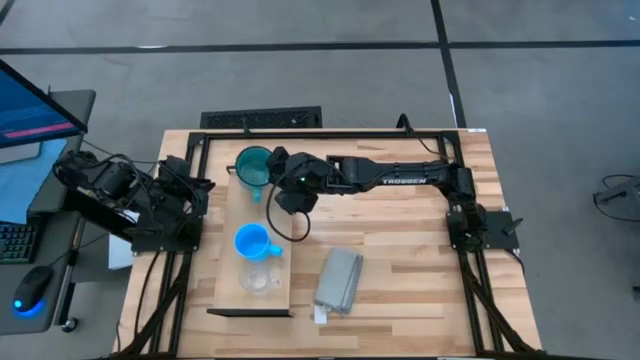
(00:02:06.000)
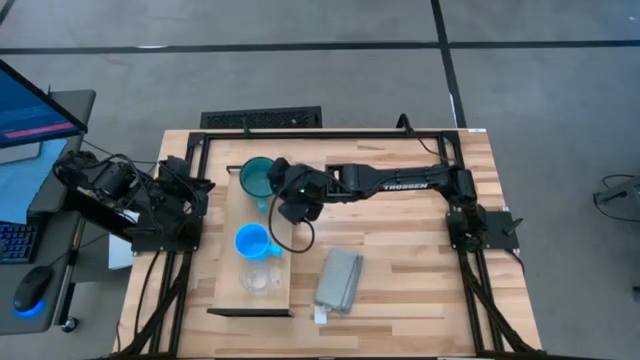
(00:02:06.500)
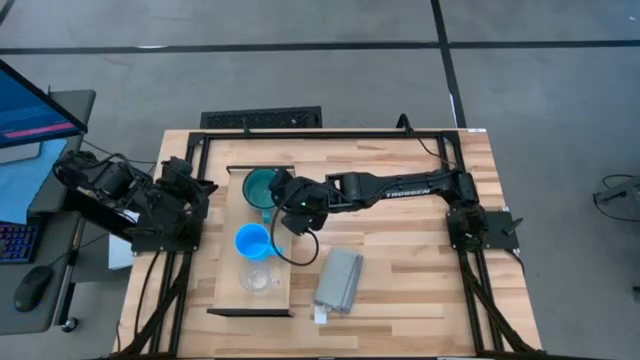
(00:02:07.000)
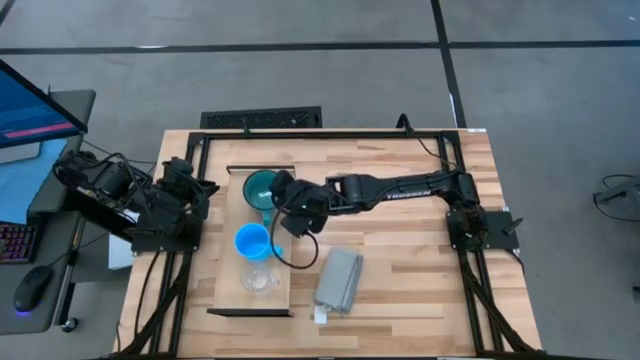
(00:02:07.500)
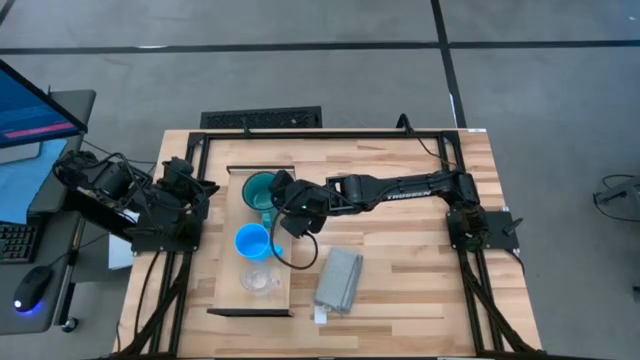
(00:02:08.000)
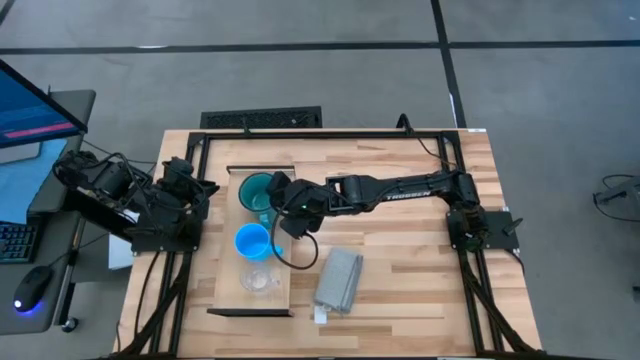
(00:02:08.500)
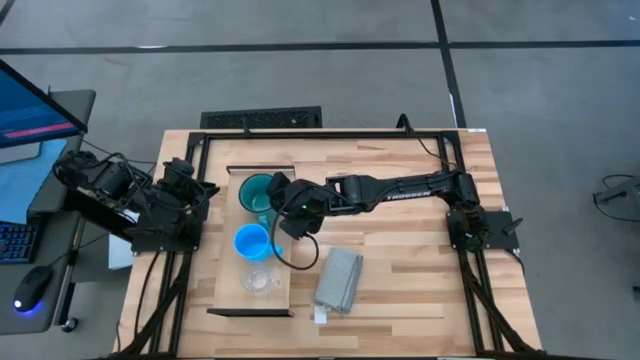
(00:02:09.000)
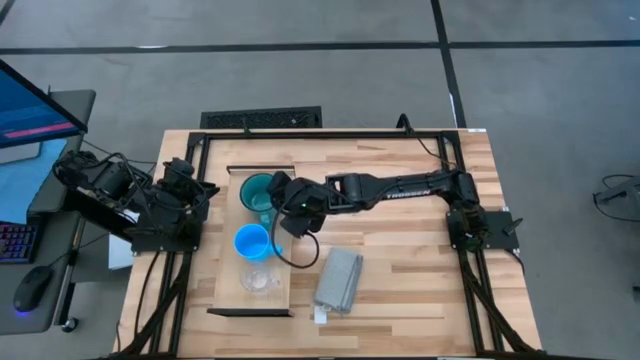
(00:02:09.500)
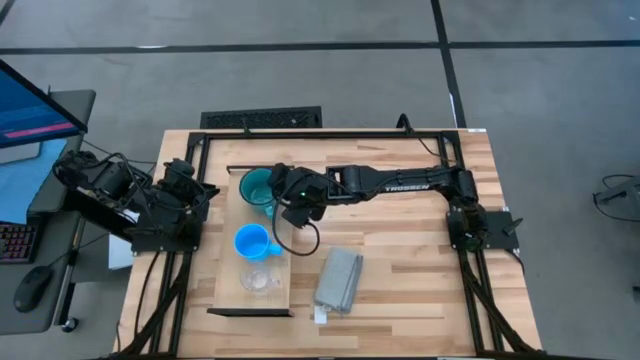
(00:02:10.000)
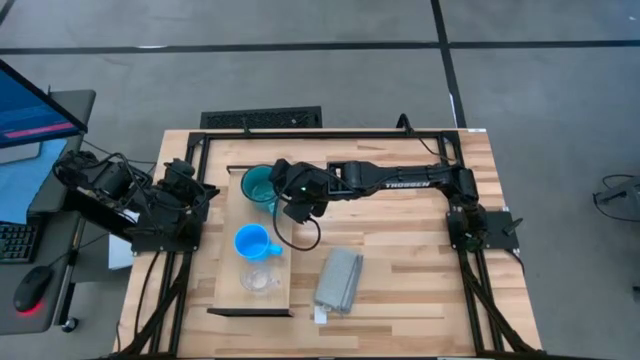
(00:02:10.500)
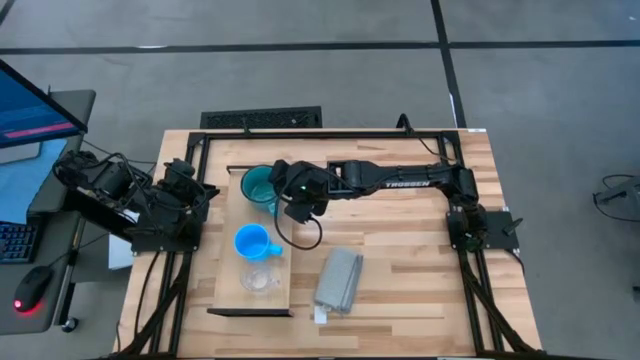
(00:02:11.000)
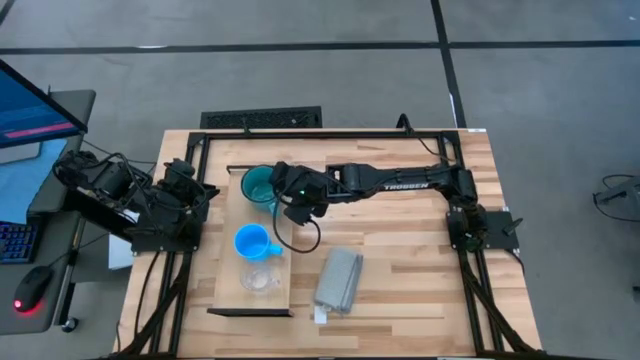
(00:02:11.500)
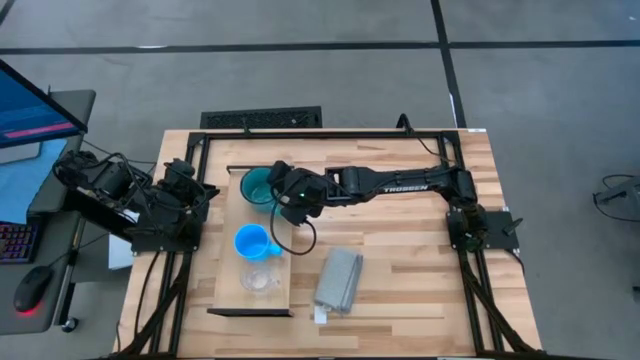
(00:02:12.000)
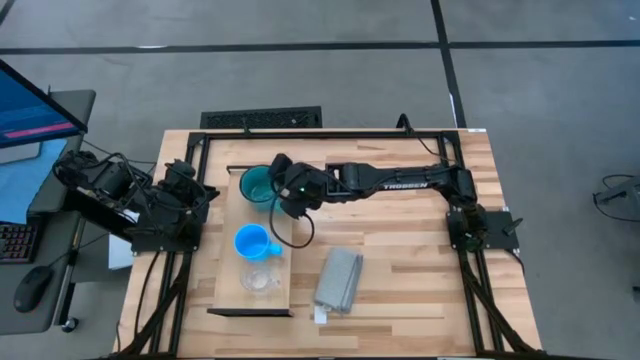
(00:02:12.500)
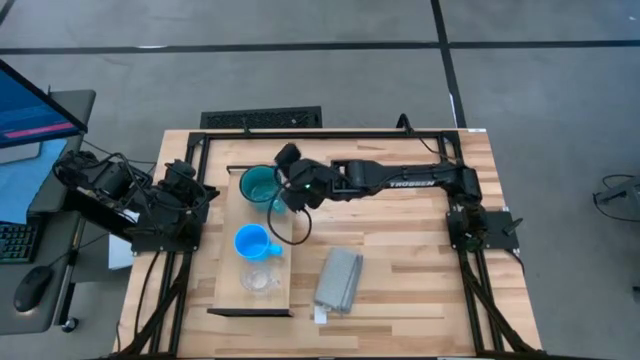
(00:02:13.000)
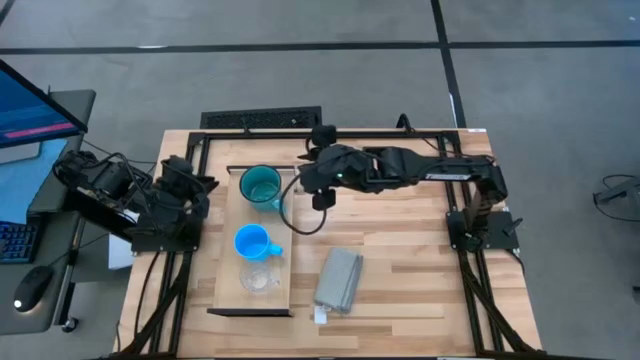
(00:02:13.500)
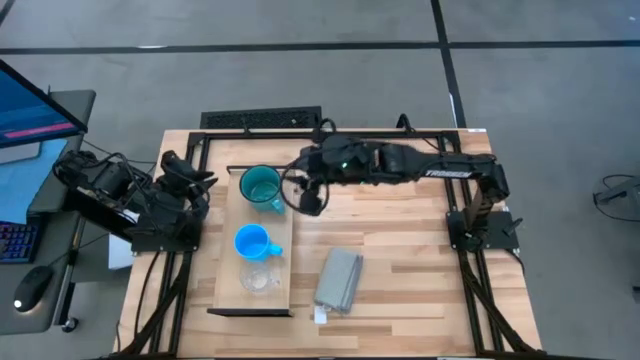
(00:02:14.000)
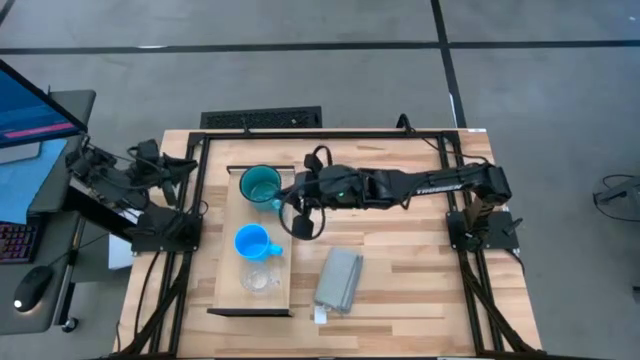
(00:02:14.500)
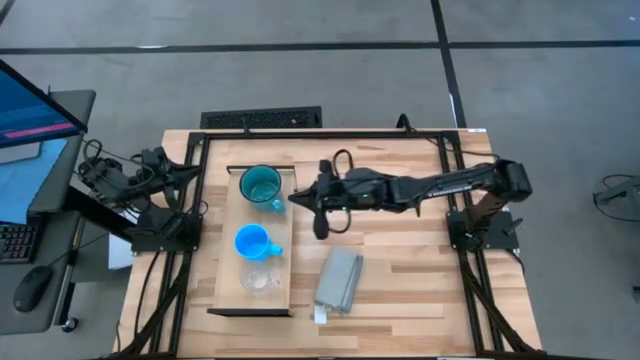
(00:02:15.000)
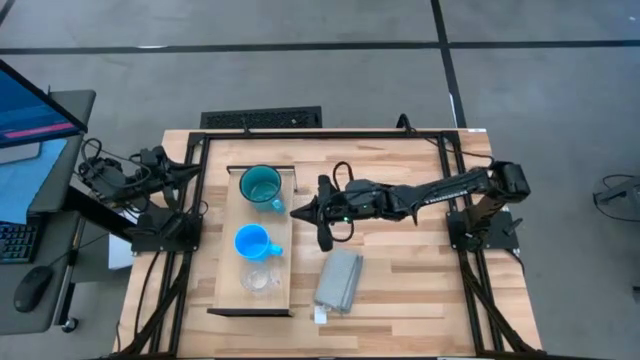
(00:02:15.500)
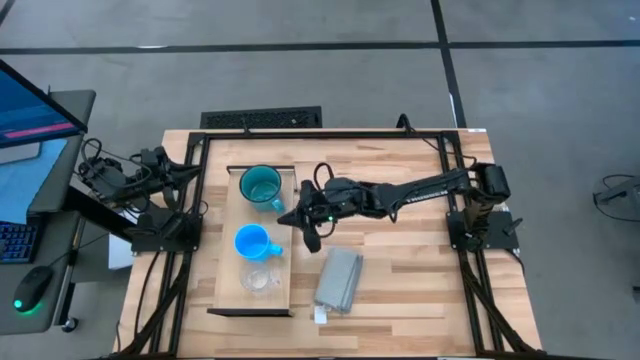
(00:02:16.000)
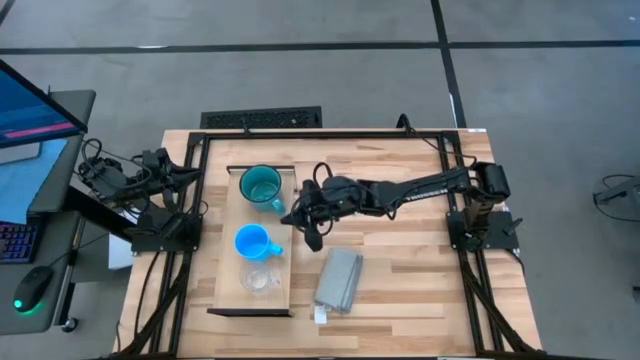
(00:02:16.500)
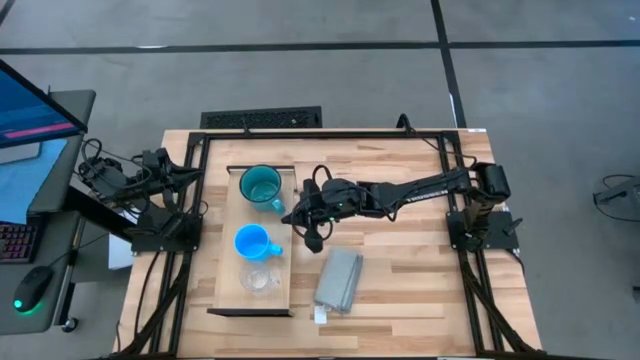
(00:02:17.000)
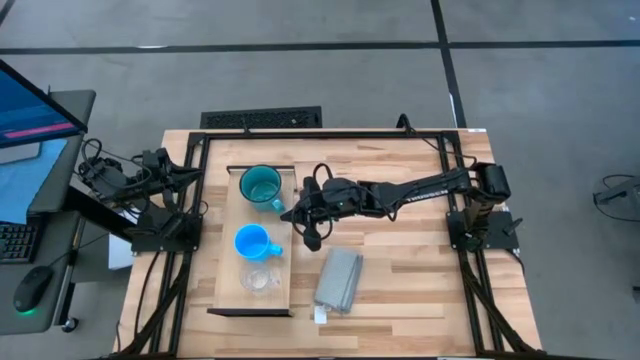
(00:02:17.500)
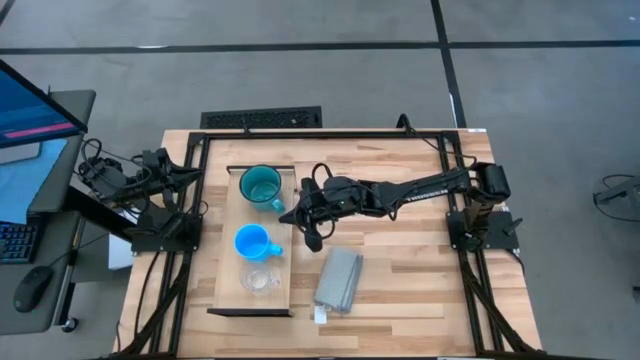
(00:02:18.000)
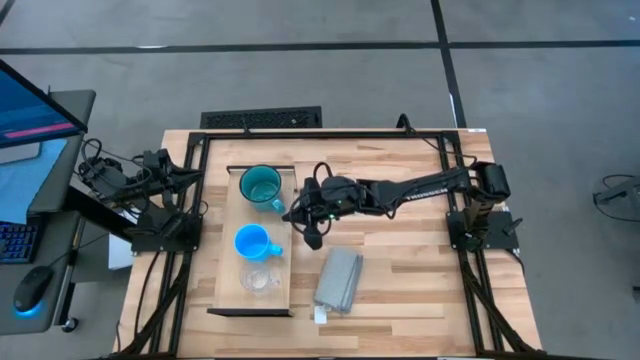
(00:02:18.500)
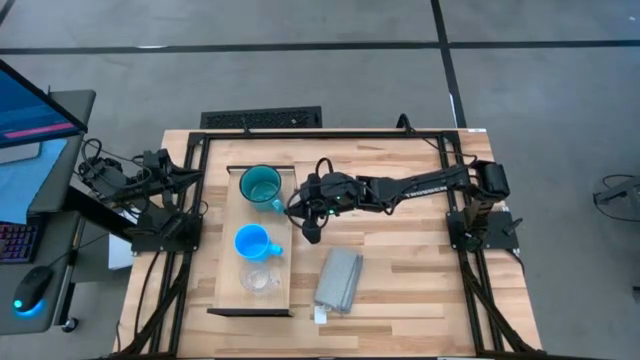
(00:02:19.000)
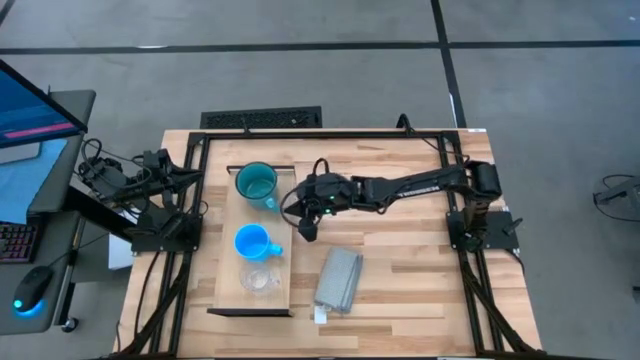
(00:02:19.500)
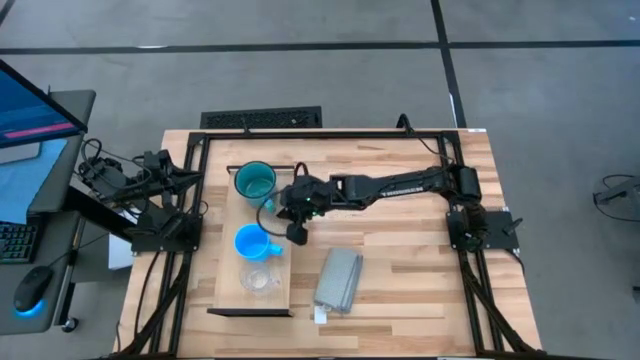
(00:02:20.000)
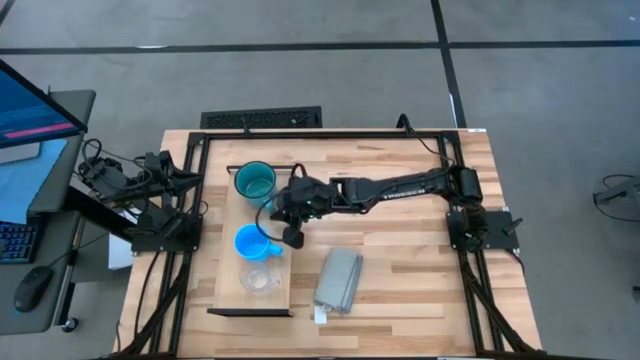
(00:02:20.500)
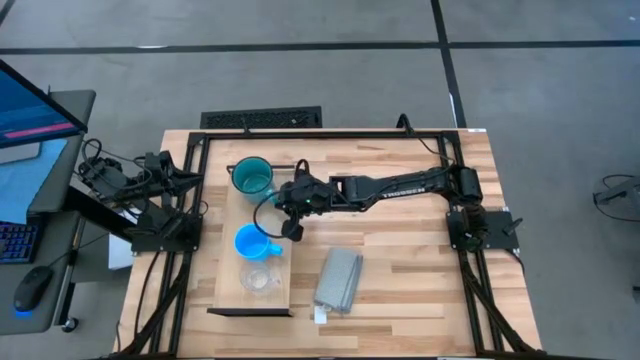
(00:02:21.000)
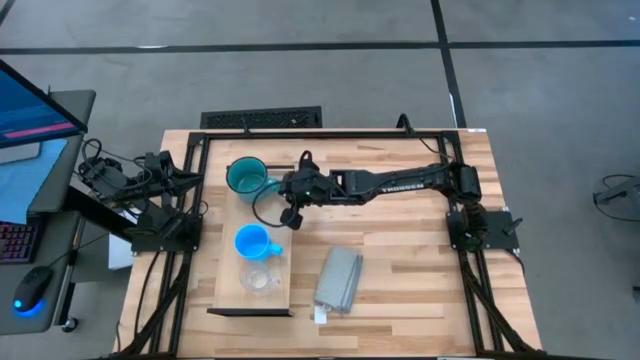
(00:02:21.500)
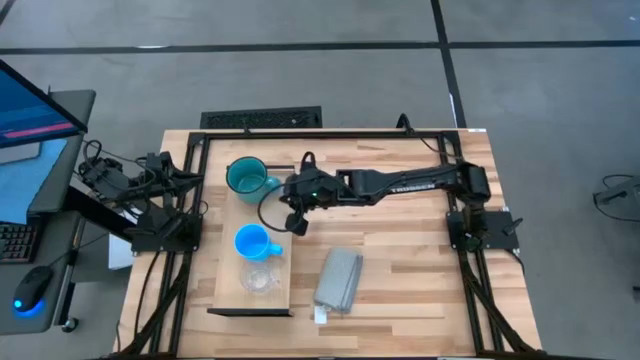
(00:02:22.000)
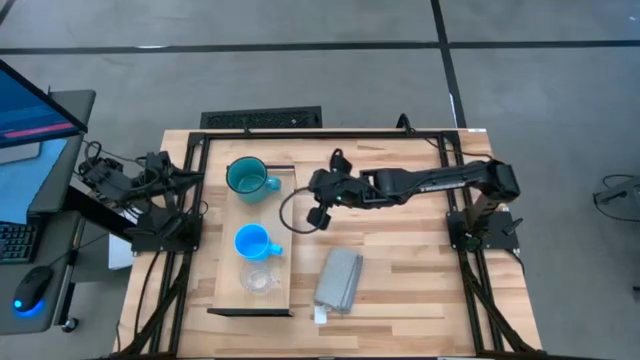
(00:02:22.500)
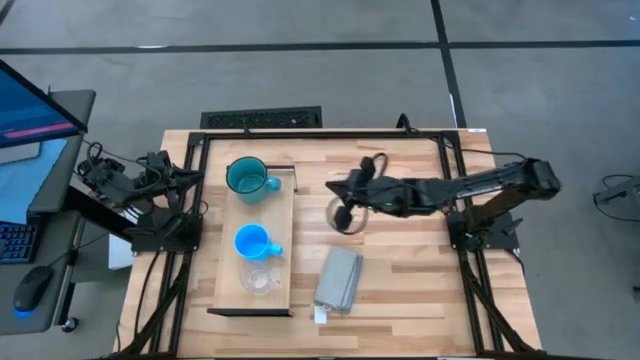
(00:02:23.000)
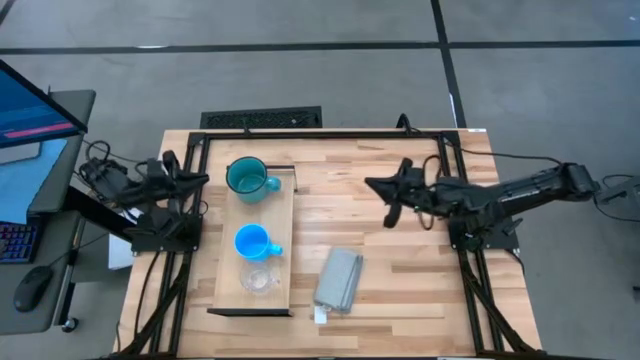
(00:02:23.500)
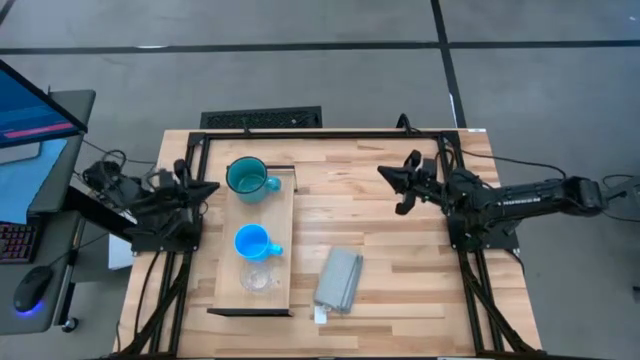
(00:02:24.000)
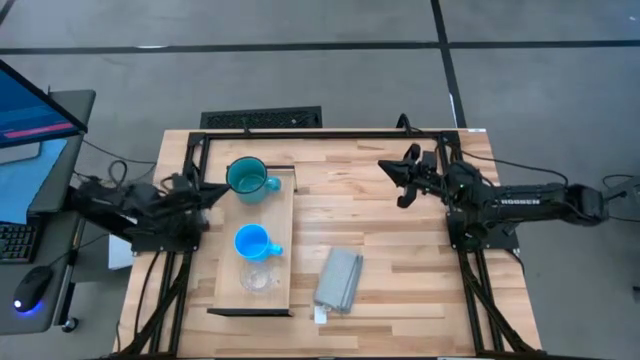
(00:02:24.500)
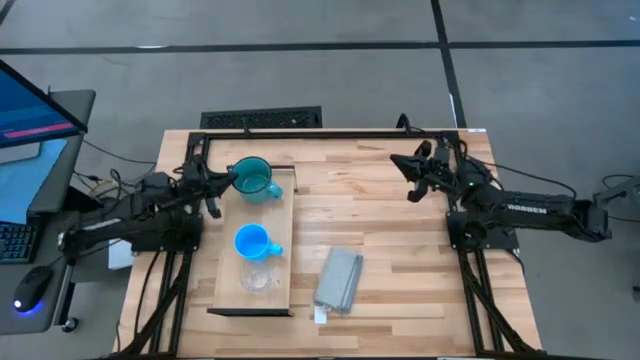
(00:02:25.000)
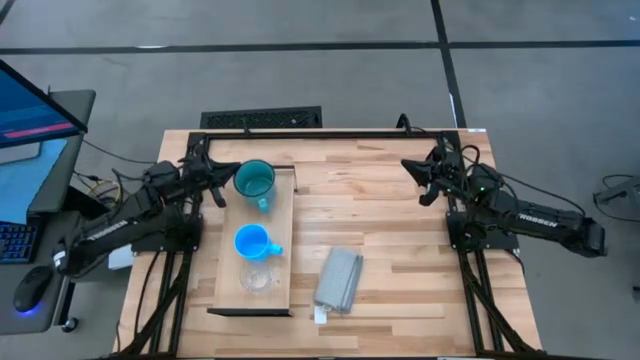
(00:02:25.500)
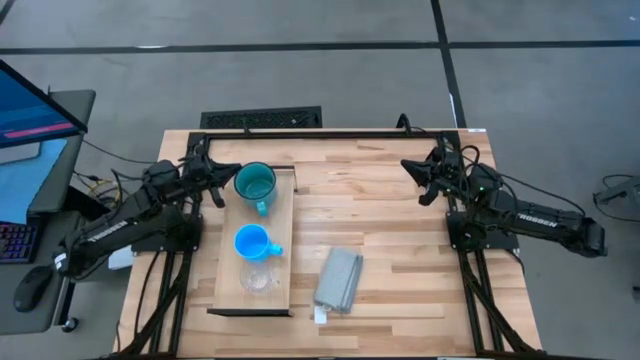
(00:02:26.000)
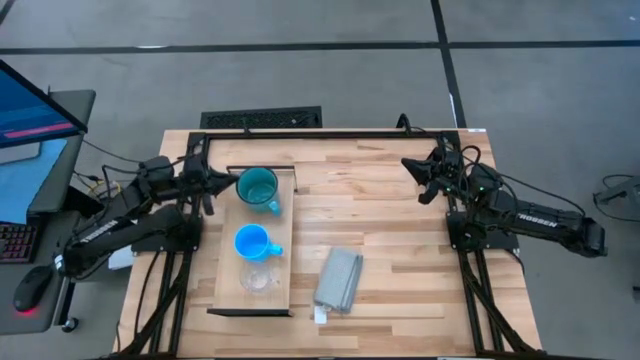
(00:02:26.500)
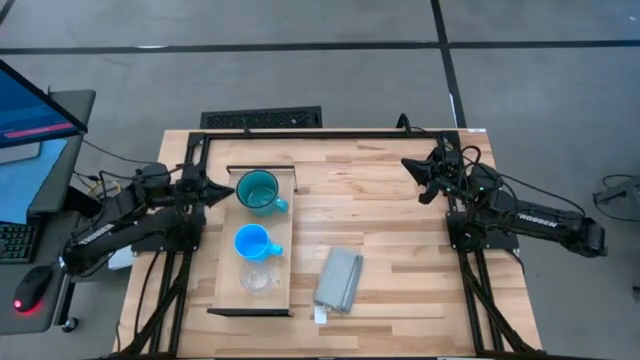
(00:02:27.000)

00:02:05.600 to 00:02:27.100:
Task: Stack small to large cups/mugs on shelf
Put the blue mug on the shelf
